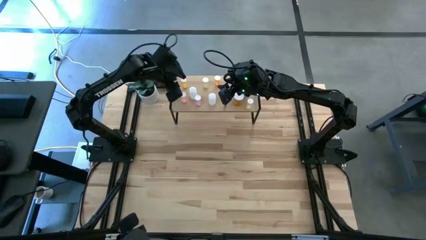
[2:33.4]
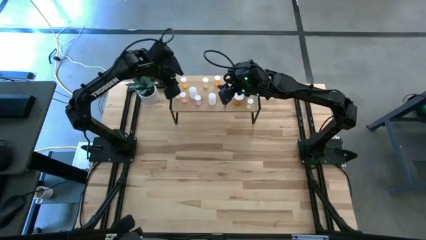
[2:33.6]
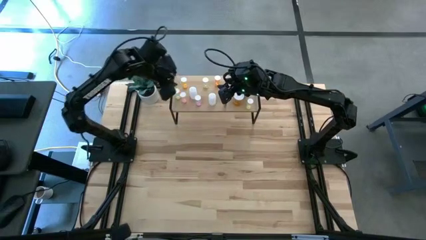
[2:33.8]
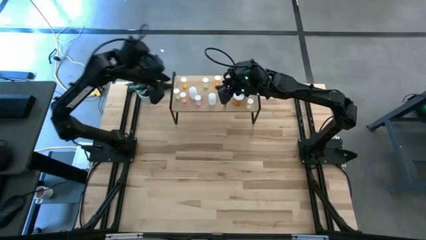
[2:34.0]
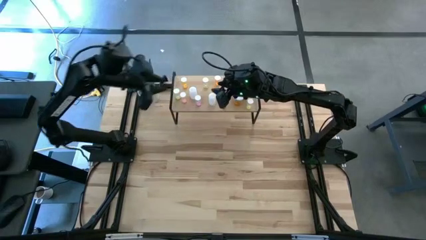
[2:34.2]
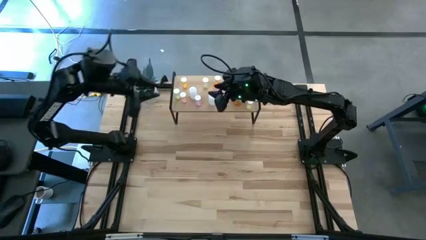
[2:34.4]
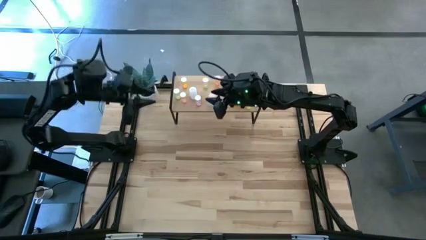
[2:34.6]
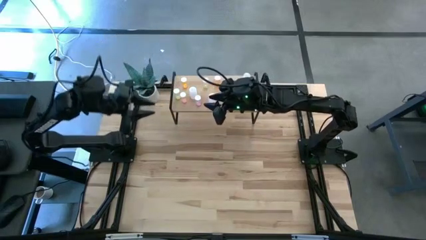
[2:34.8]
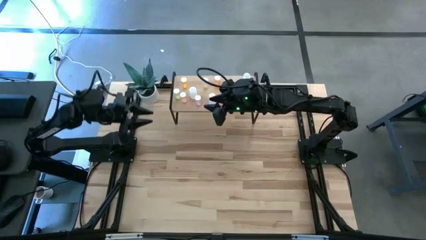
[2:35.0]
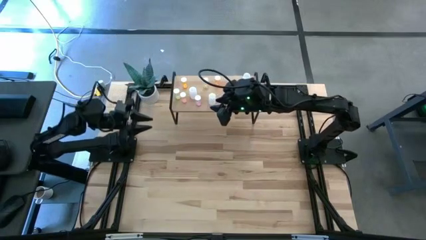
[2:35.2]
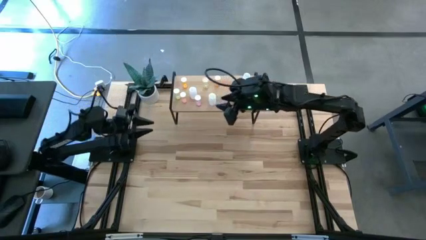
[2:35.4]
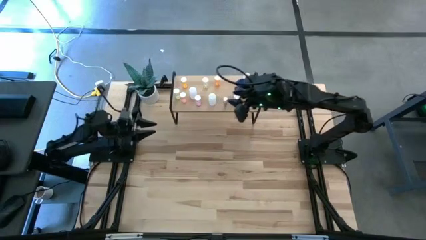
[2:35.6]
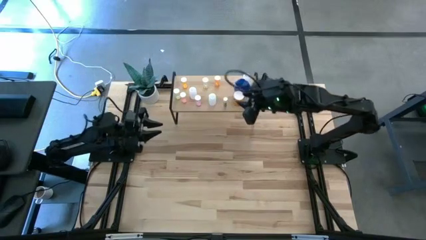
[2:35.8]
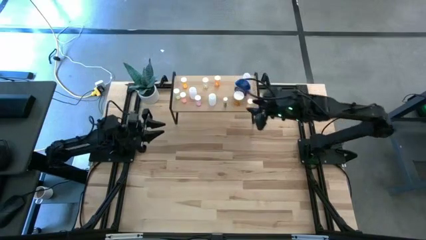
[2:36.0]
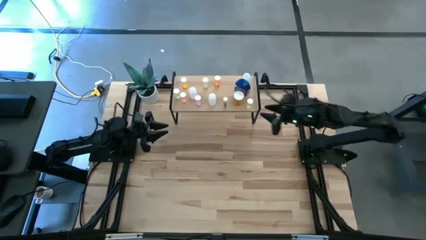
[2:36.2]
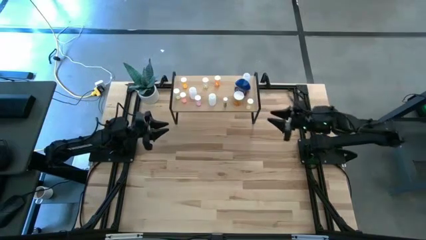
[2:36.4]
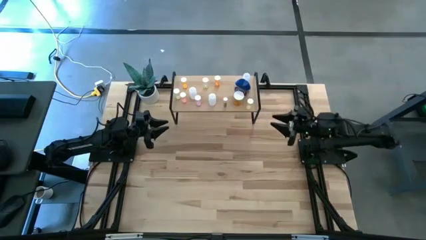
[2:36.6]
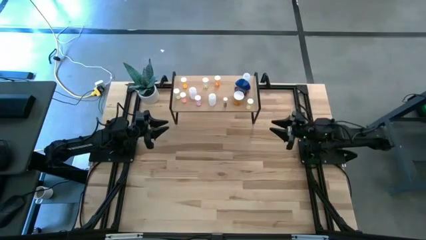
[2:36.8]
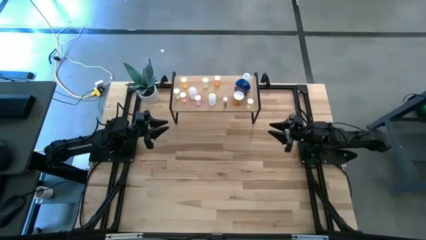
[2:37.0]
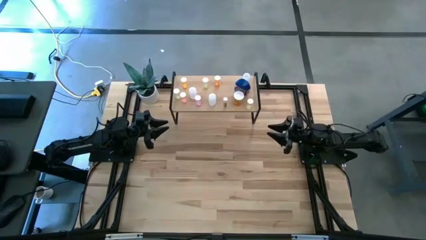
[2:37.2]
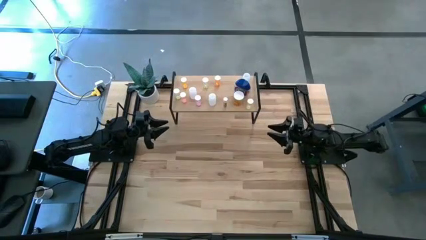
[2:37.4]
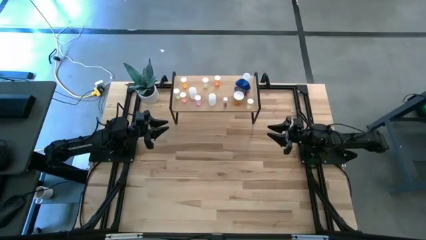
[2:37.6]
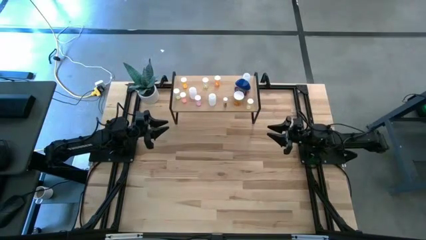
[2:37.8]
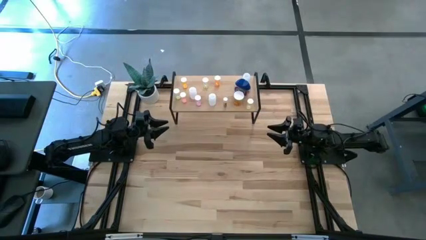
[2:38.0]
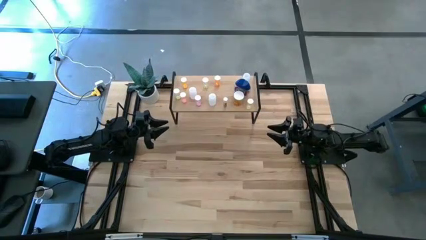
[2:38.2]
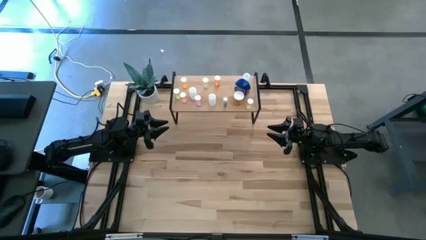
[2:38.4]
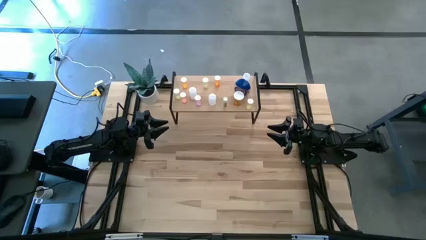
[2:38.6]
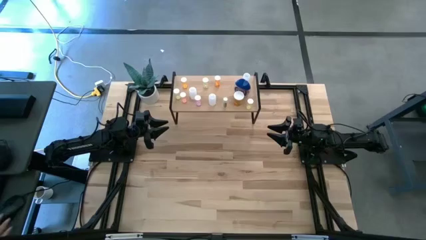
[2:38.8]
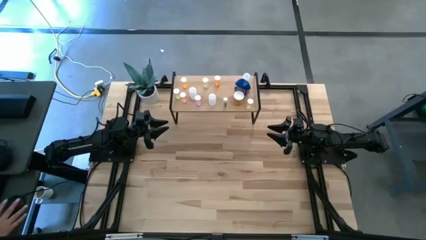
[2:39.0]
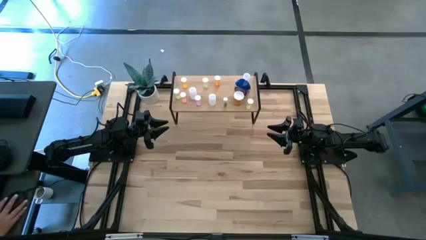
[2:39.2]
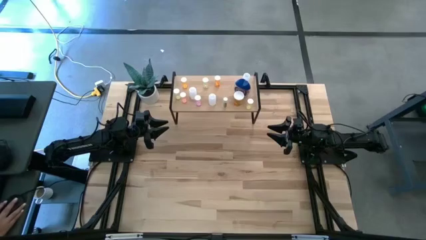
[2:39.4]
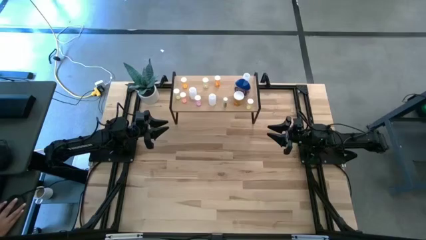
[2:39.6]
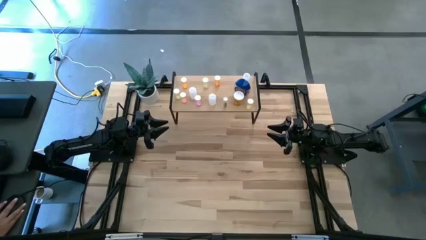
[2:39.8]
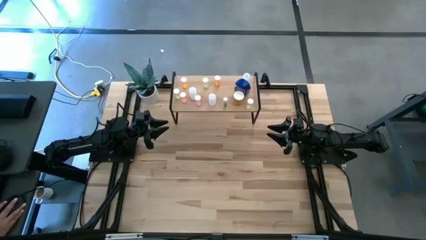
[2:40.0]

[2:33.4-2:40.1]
Task: Pick and place medicine bottles onto shelf by color
Return to Home Position

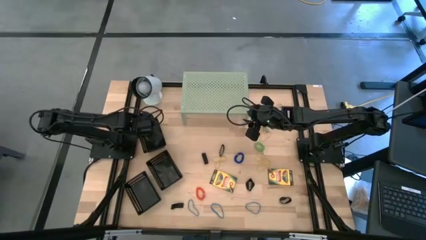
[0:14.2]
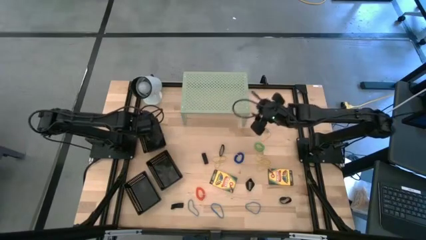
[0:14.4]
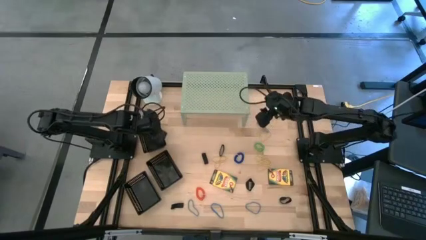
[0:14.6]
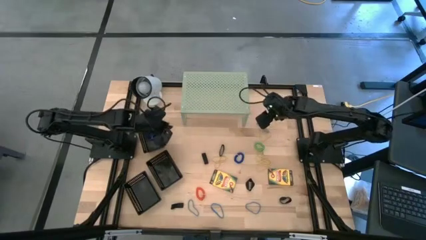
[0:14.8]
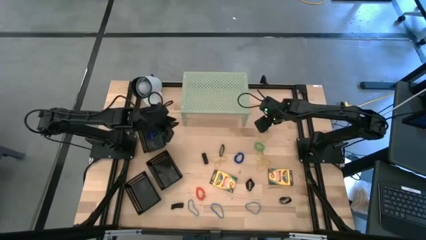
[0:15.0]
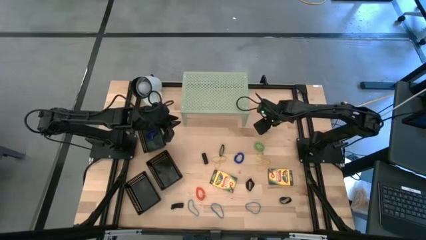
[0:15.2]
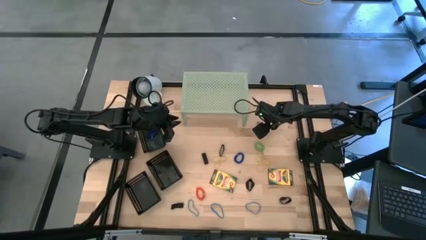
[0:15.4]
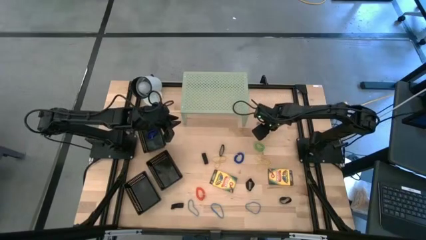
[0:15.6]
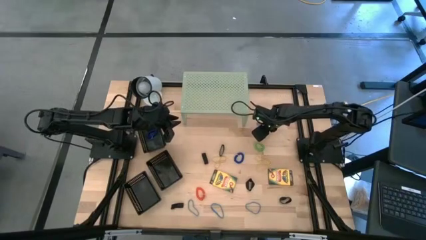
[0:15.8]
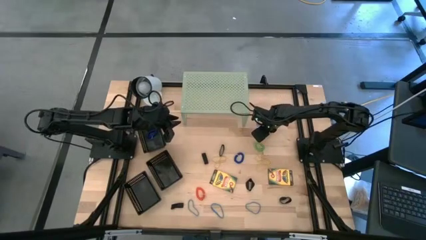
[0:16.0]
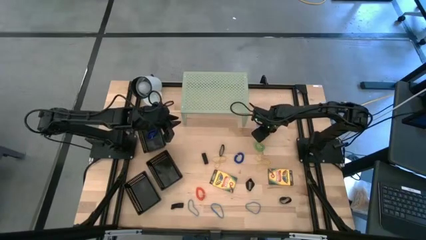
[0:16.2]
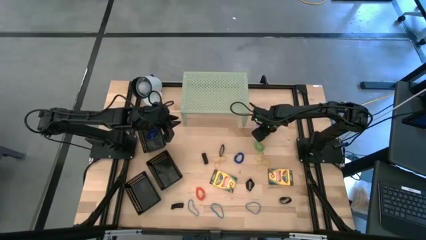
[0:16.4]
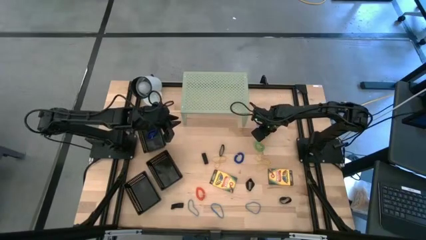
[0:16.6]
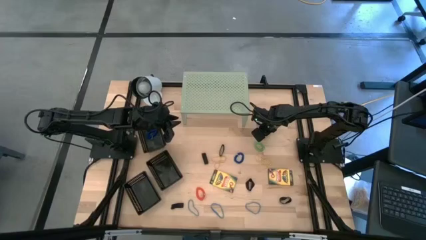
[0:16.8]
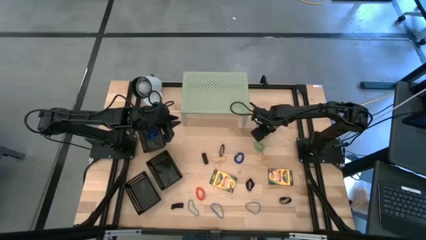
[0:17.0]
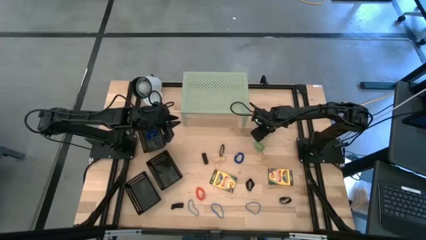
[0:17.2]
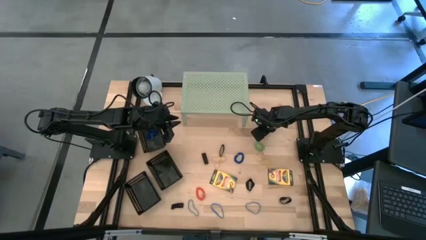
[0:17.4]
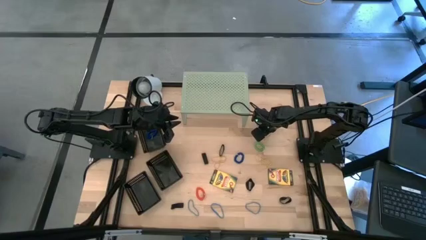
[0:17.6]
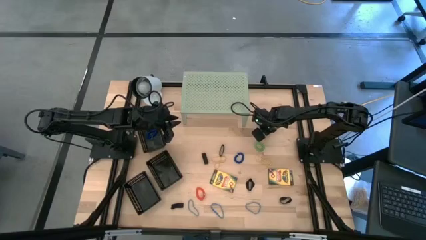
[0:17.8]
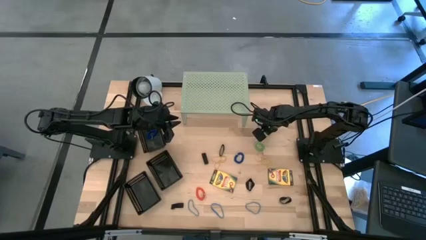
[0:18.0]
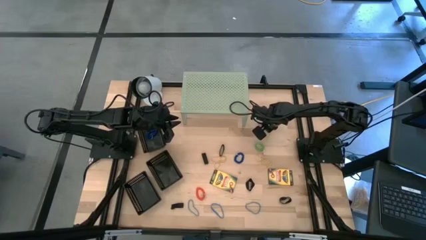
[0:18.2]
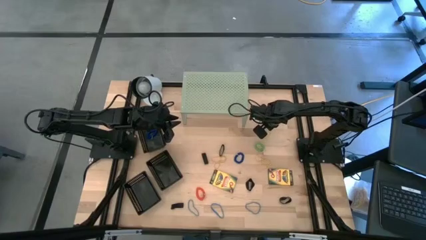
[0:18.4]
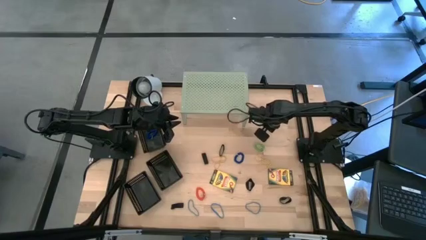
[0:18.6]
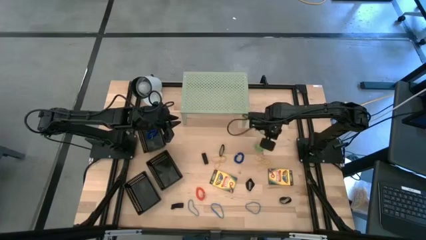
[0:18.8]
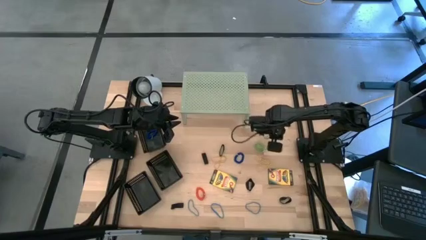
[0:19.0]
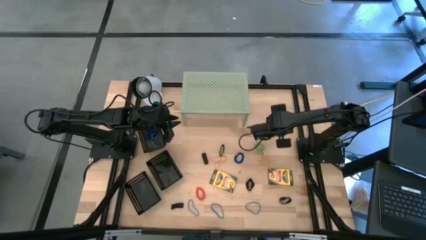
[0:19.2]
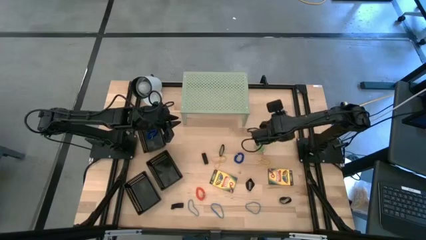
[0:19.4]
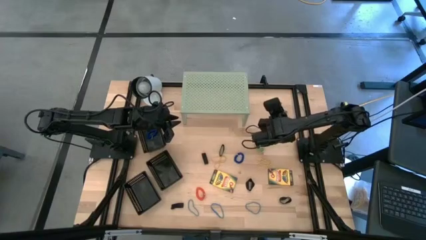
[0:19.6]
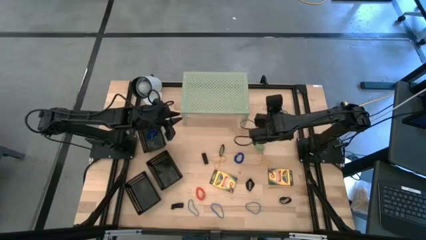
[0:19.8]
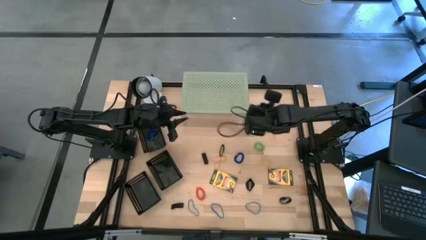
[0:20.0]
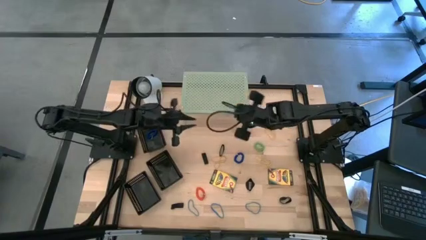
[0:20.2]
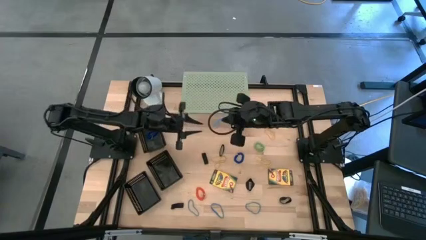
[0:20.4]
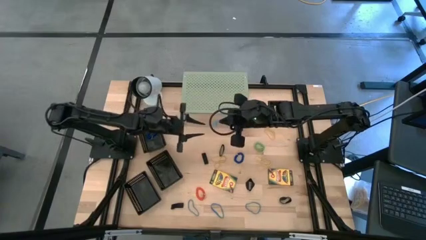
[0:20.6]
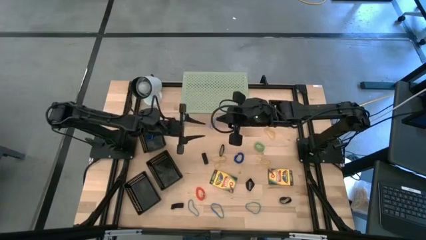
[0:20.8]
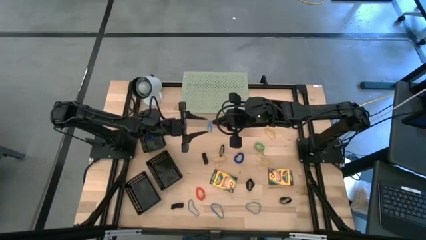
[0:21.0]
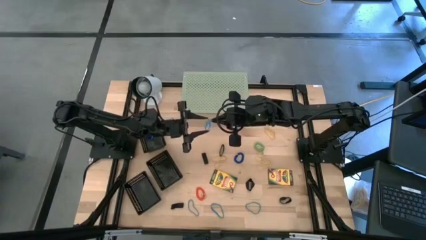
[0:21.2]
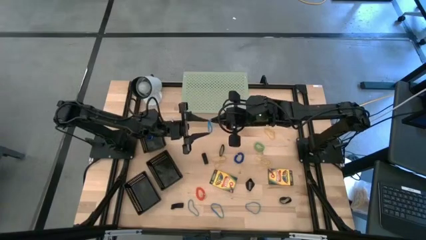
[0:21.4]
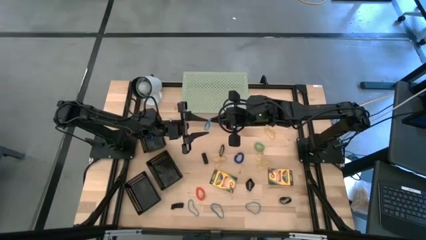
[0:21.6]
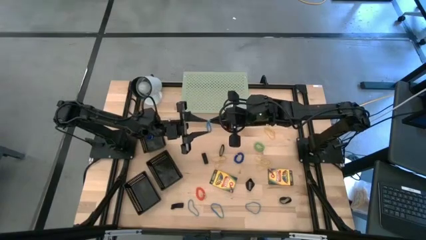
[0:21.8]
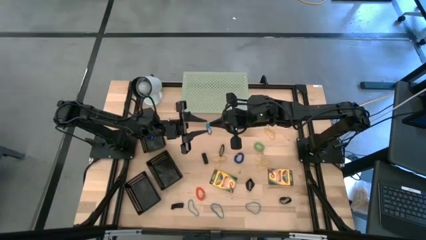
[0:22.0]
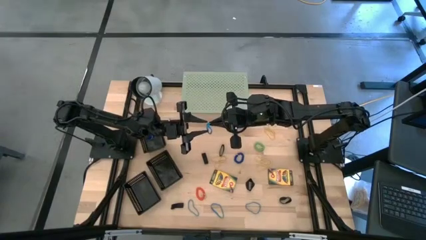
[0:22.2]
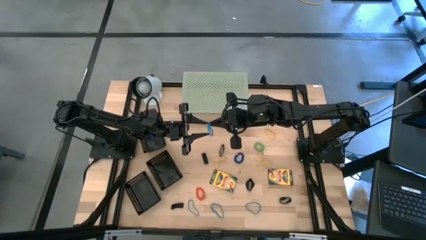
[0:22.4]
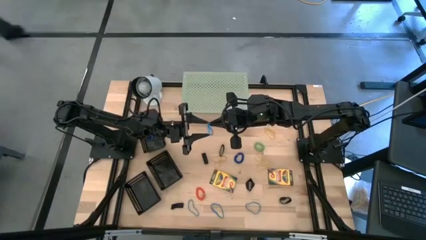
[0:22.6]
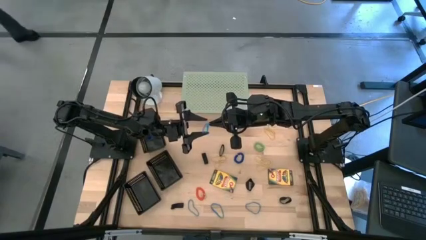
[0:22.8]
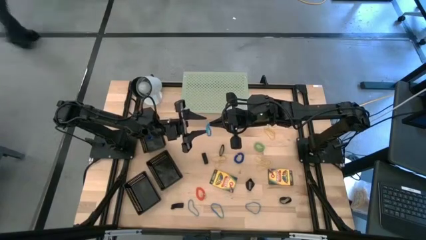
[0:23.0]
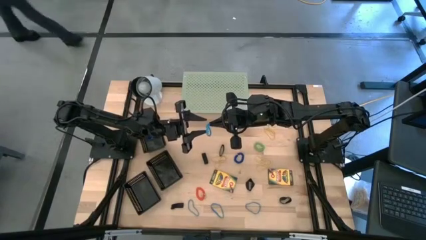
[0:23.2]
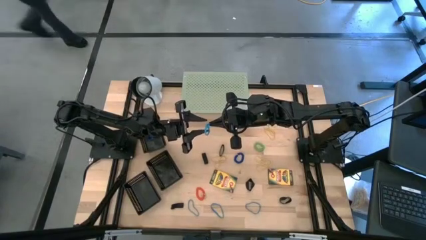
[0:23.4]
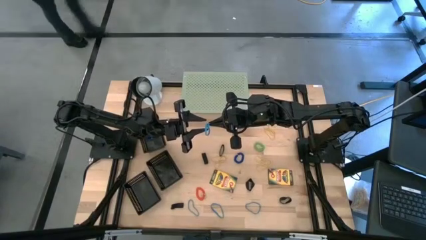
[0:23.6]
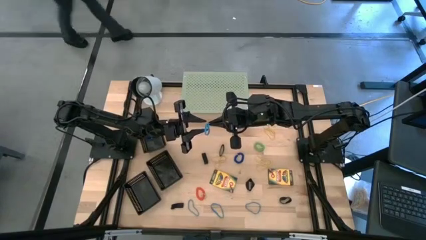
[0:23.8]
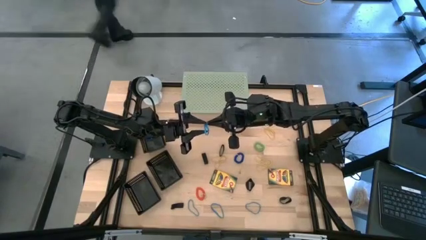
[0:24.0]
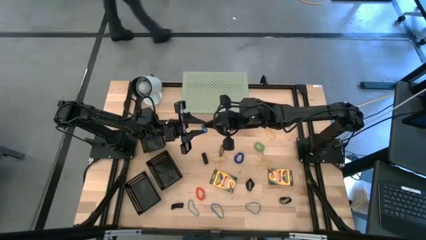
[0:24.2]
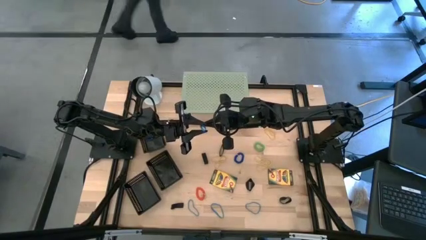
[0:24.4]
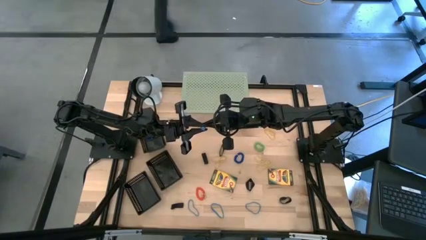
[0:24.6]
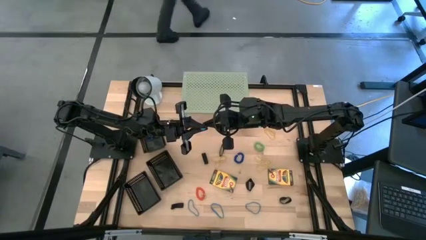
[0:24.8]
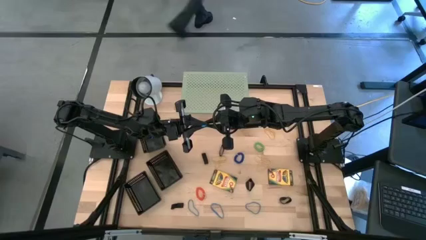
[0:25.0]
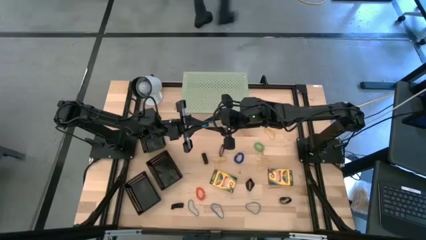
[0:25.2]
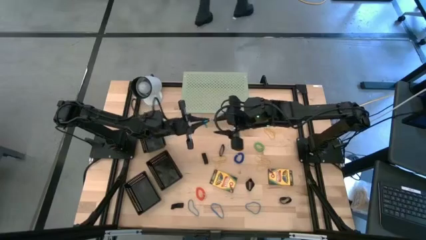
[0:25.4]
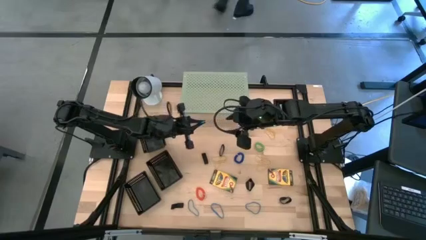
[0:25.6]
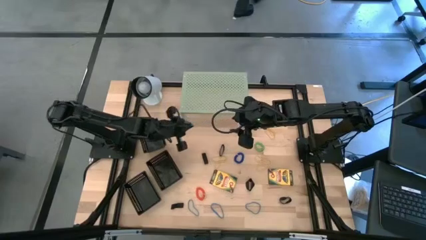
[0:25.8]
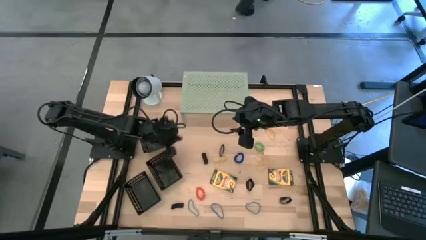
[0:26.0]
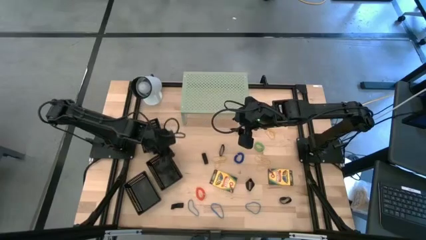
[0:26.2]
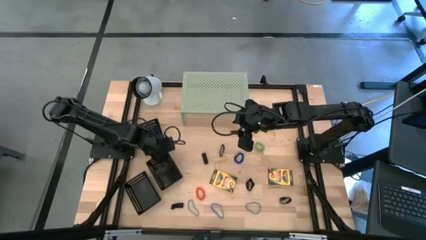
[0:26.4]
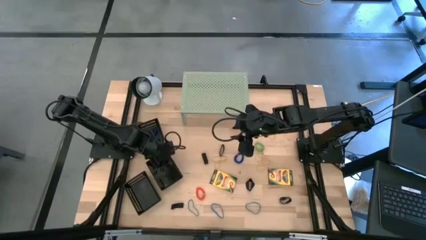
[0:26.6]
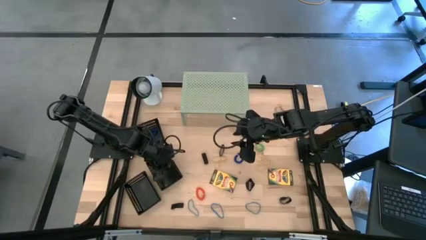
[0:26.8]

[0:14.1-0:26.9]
Task: Pick & Place Office Desk Supplies
Put the blue rubber band into the middle black bin
